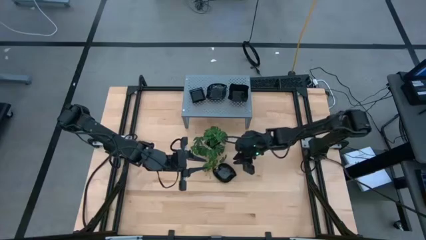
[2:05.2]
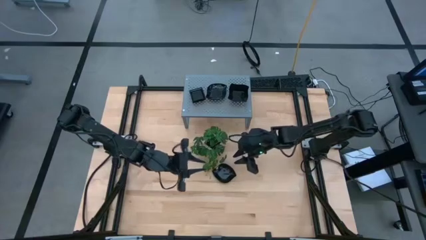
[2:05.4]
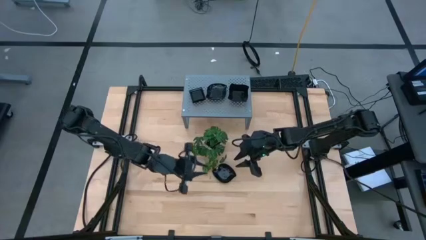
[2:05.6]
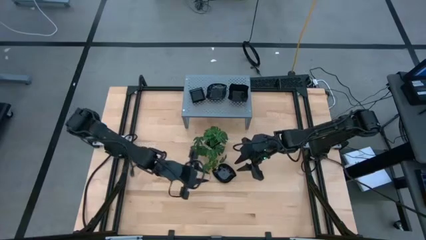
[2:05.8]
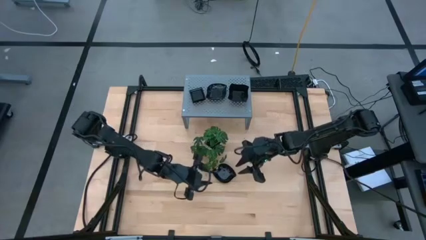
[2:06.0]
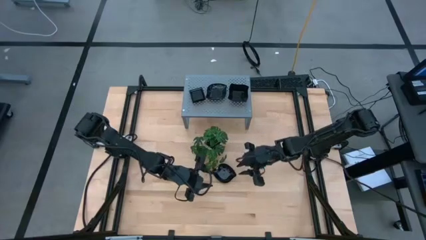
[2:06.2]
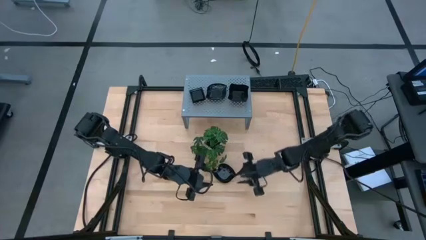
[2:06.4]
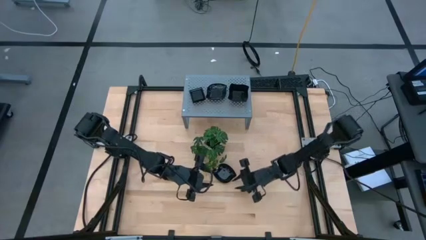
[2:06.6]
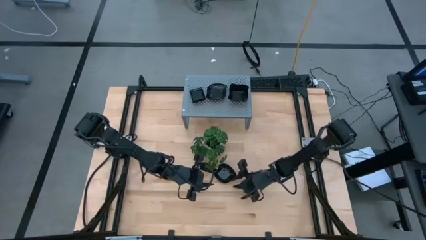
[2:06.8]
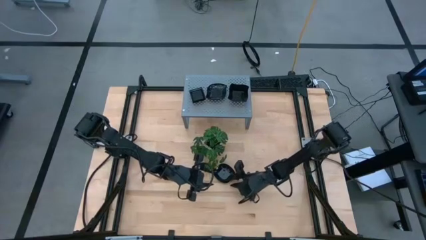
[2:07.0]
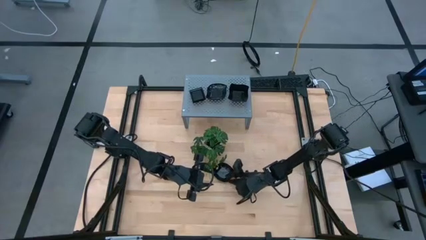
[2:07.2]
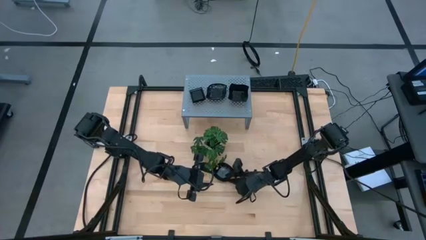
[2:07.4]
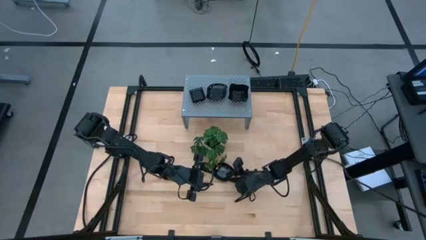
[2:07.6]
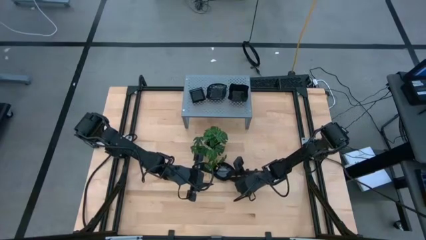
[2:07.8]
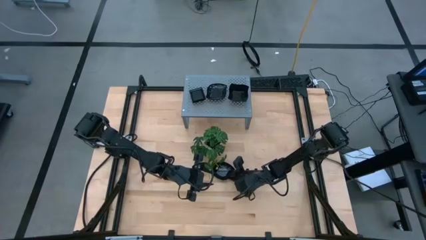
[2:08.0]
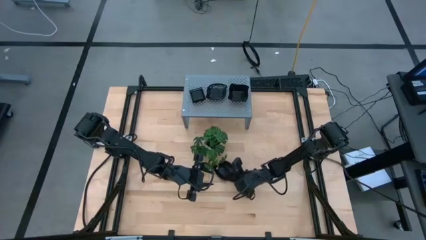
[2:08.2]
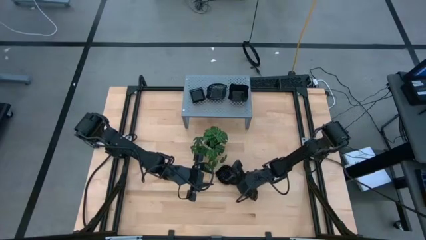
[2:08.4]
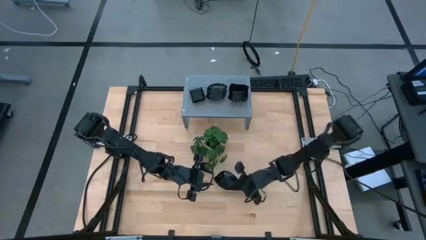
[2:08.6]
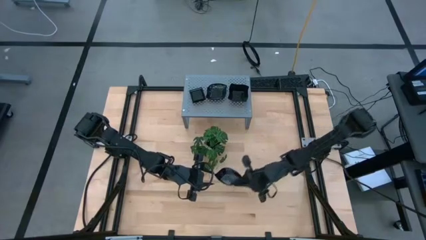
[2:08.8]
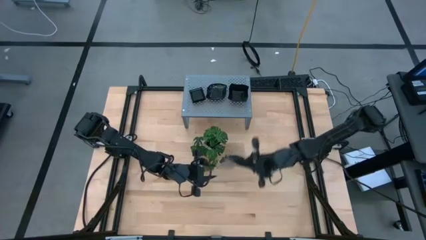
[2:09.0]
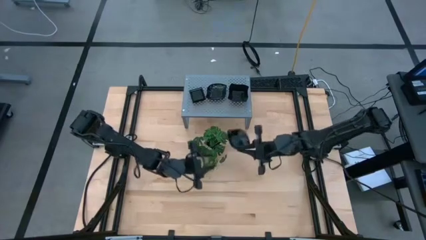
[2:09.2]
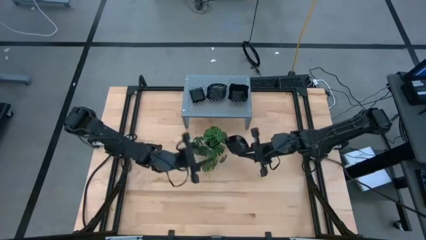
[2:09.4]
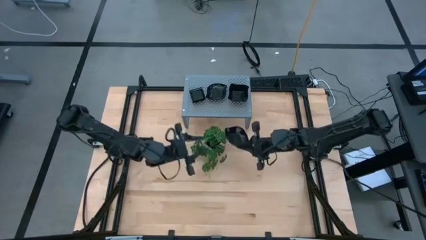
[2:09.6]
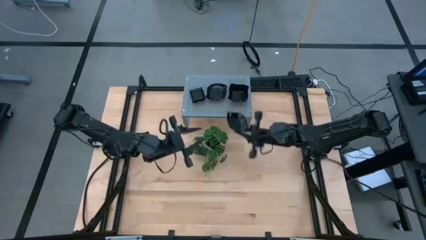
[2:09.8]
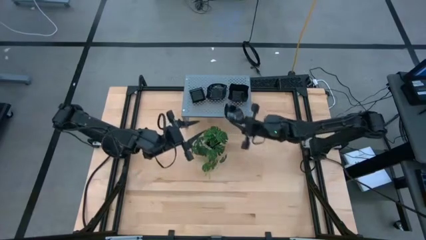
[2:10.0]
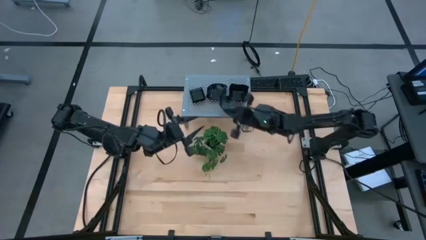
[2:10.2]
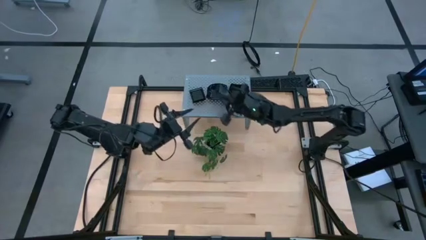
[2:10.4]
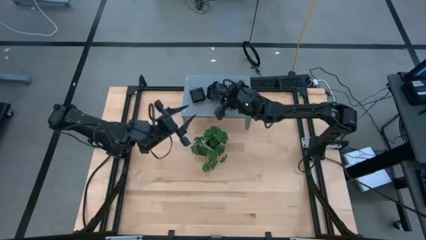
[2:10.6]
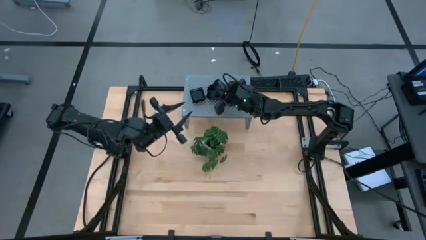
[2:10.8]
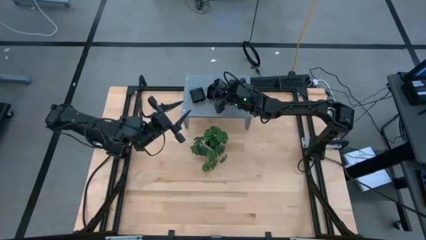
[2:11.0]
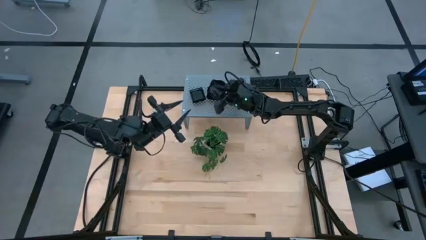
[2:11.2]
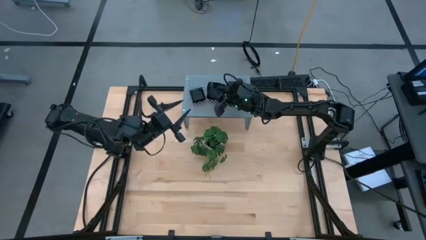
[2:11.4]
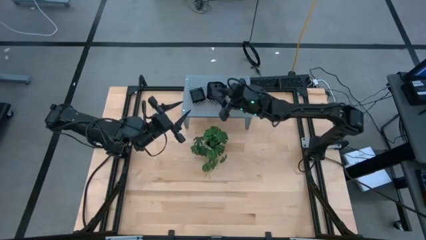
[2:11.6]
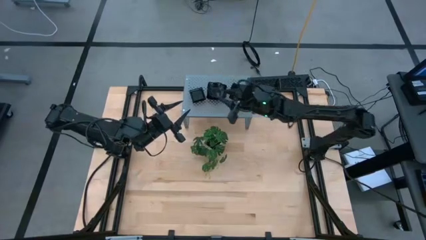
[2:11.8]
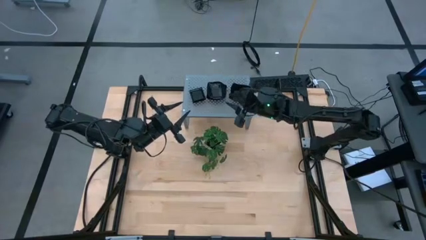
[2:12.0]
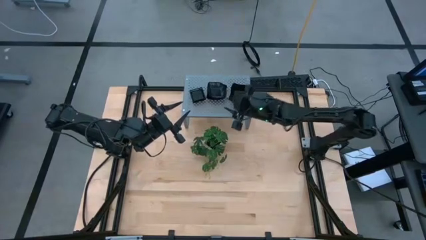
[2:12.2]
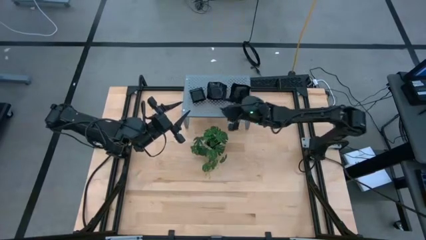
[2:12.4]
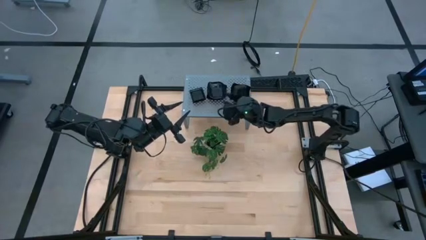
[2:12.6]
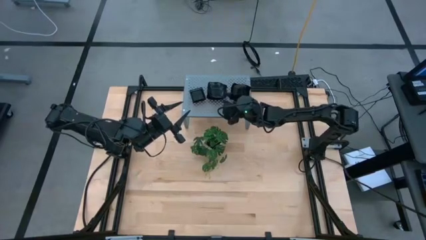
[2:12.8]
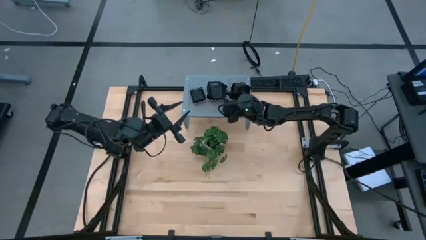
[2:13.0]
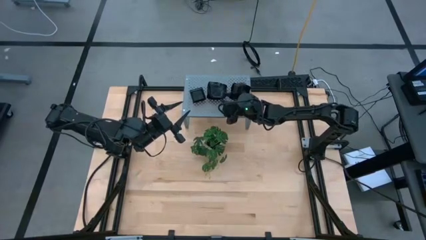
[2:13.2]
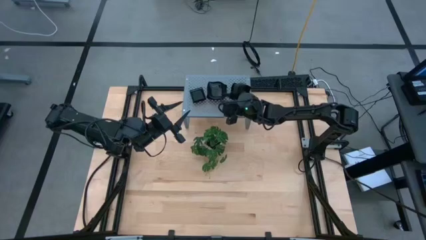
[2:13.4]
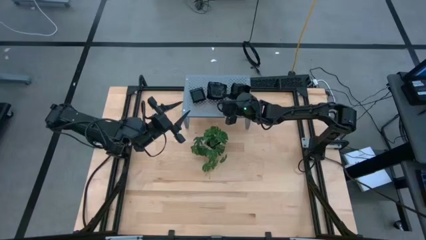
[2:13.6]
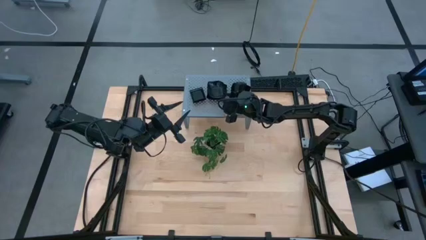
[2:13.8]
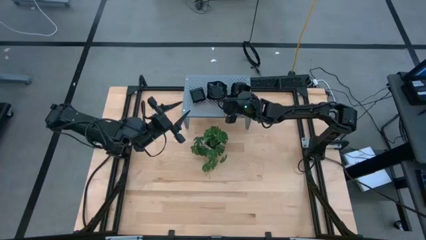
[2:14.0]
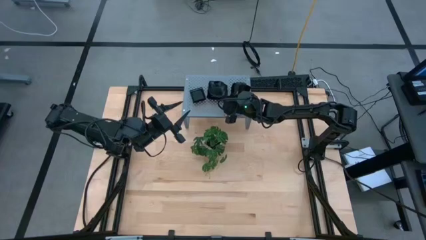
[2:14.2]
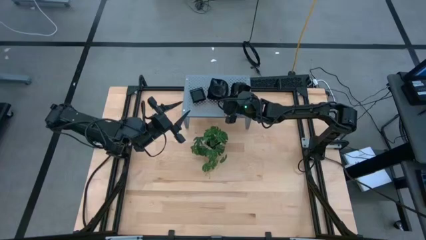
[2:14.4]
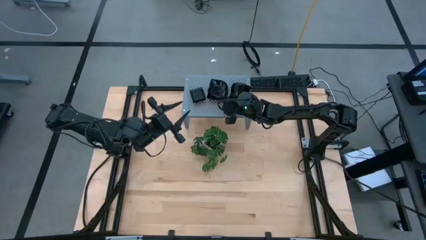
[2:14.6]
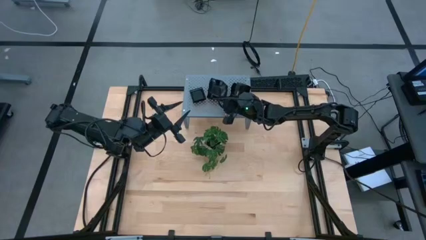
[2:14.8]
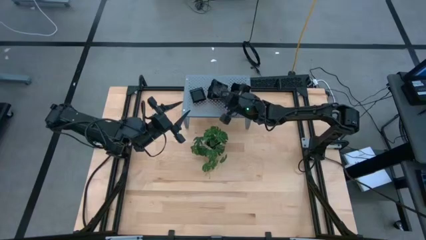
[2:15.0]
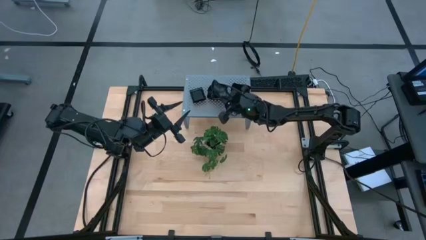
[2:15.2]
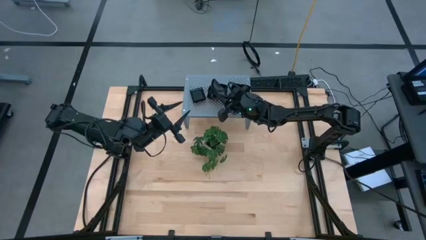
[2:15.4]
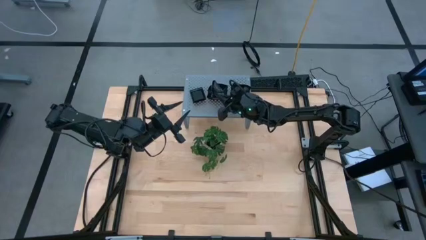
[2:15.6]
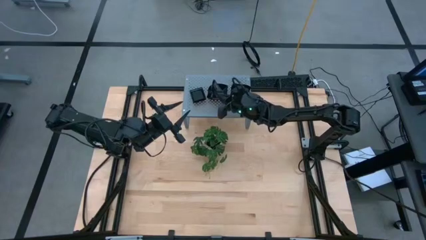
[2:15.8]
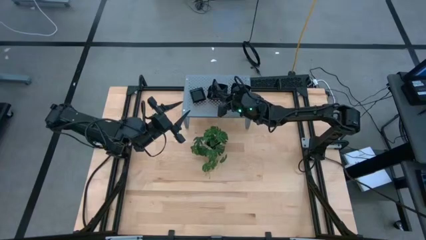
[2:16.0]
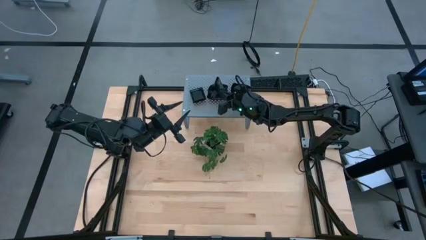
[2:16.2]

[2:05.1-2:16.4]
Task: Pick & Place Mini shaped plates
Stack the black leaf shaped plate on top of the other black leaf shaped plate on the shelf

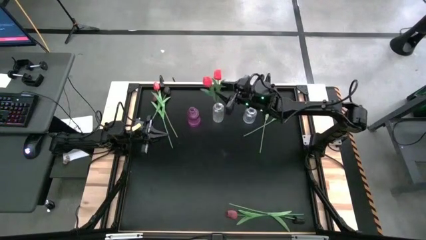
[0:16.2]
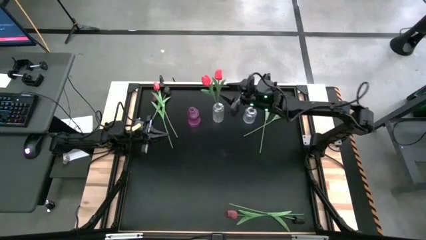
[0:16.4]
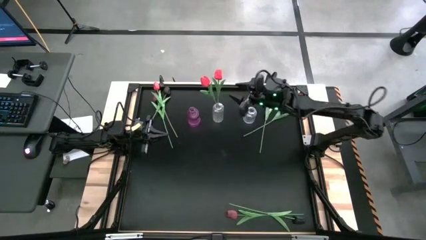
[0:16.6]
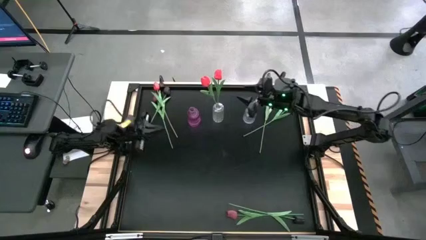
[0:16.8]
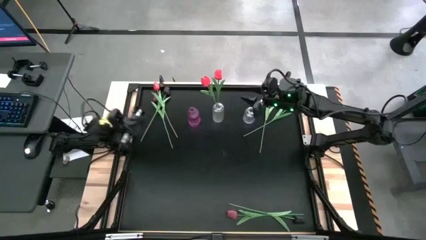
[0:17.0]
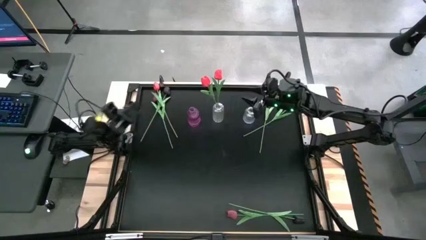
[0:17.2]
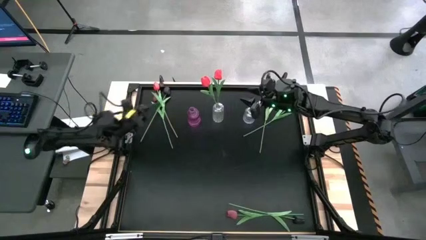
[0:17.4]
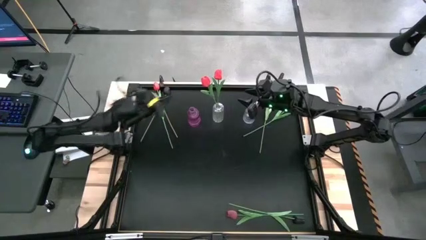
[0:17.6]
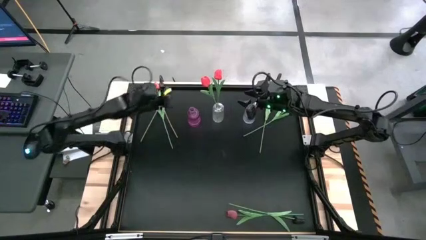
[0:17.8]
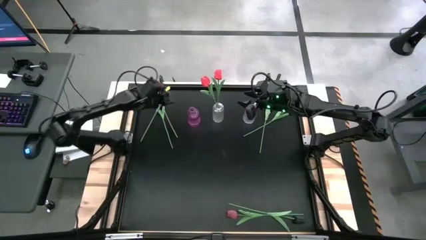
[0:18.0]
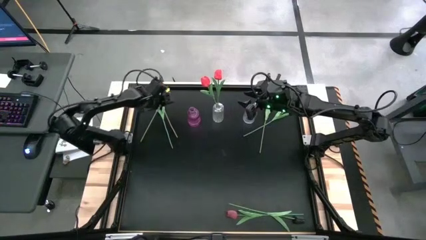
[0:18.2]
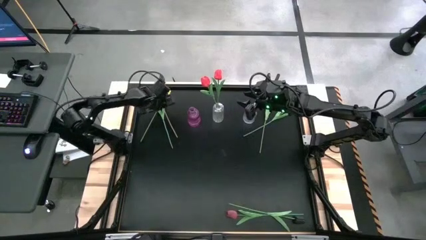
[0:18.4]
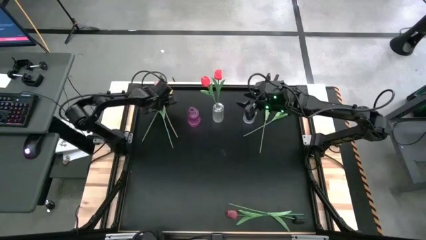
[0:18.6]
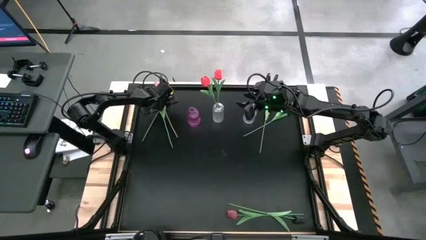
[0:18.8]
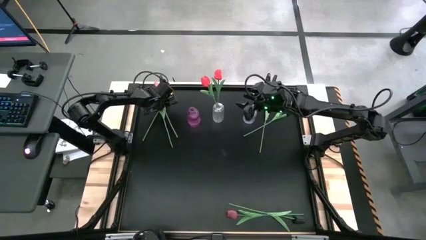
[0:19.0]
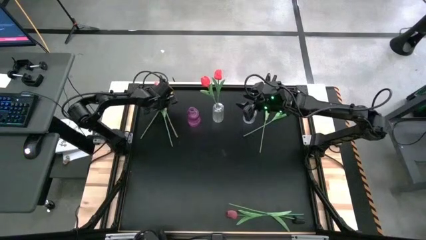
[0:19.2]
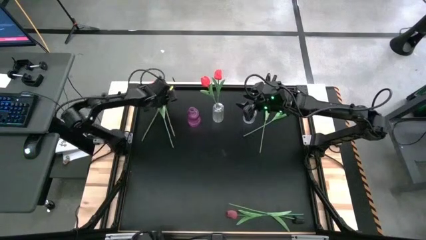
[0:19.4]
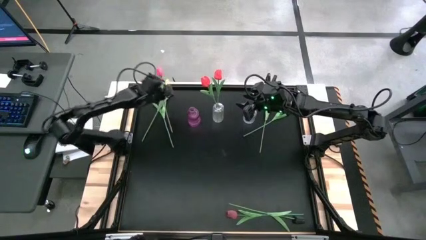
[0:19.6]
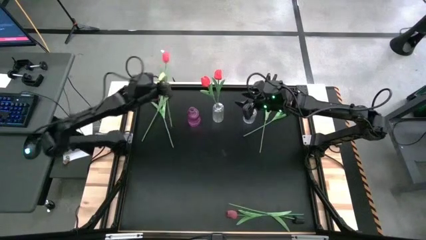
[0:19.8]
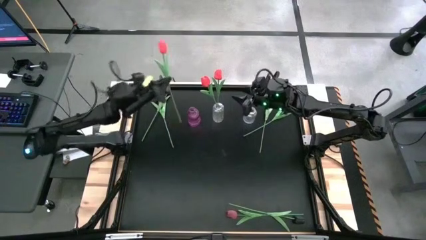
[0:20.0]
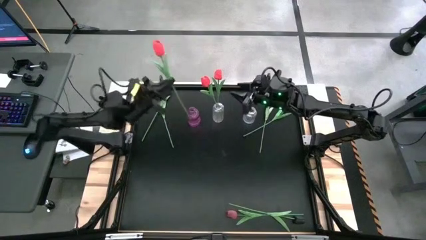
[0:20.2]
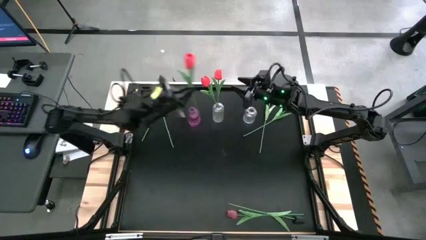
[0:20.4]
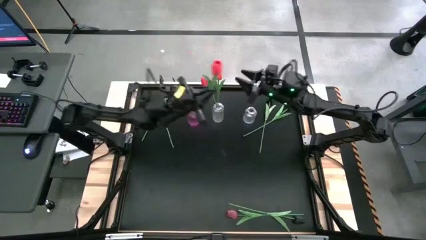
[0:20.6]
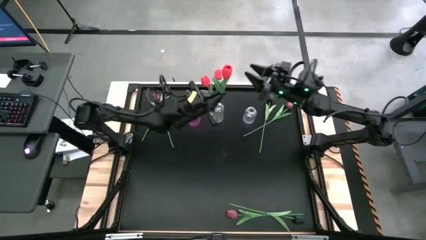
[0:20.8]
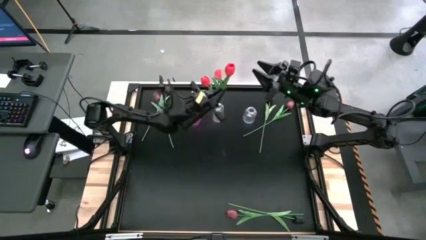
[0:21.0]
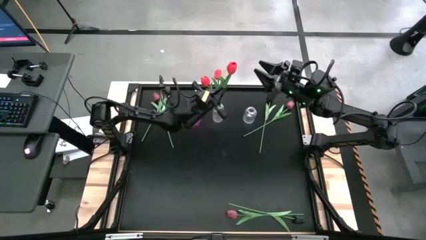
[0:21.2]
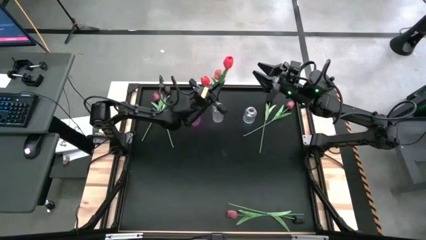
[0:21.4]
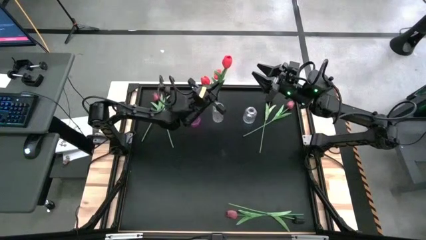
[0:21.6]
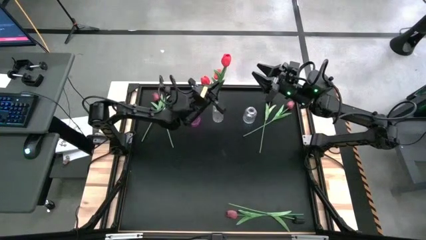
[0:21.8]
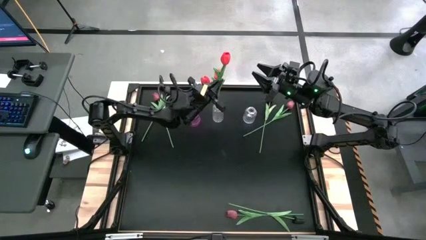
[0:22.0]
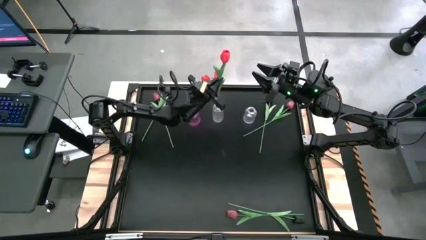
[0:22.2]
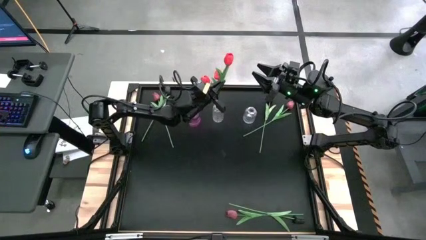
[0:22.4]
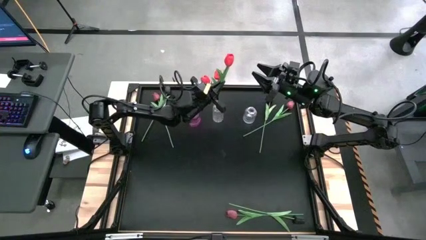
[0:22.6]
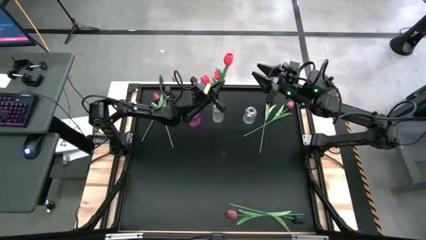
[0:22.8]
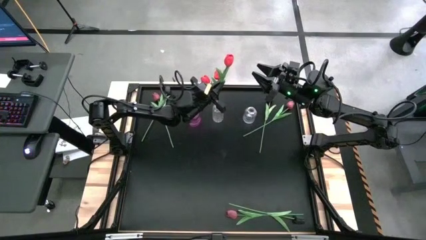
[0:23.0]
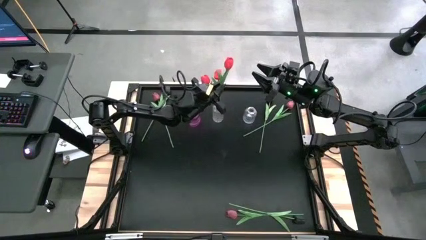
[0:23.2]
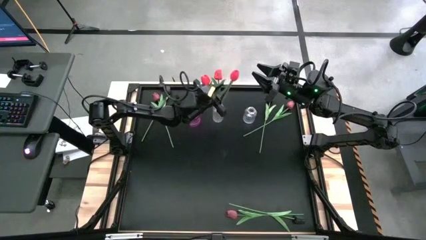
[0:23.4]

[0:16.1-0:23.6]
Task: Sort flowers into vase by color
Put the red tulip into the left transparent flower vase
